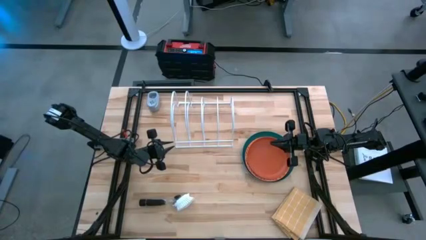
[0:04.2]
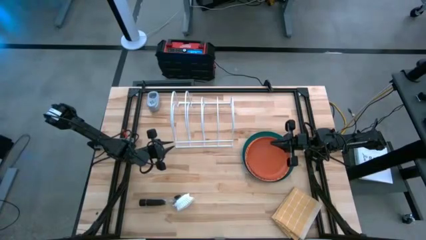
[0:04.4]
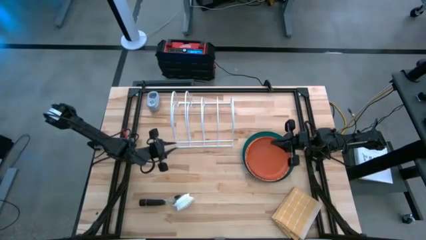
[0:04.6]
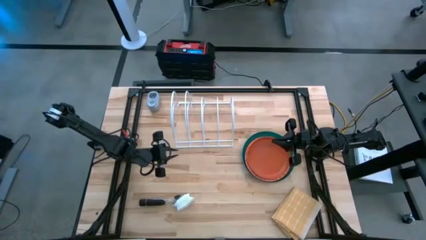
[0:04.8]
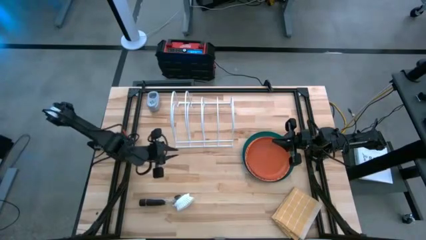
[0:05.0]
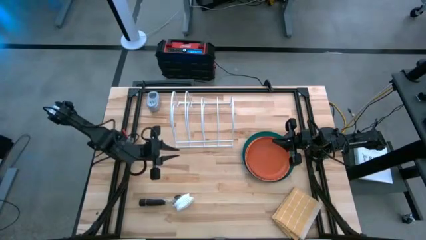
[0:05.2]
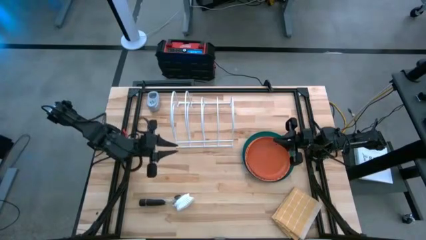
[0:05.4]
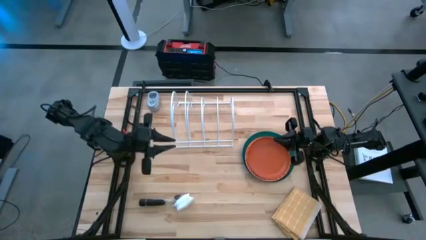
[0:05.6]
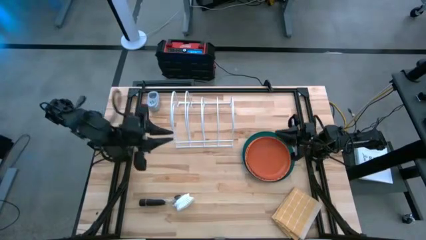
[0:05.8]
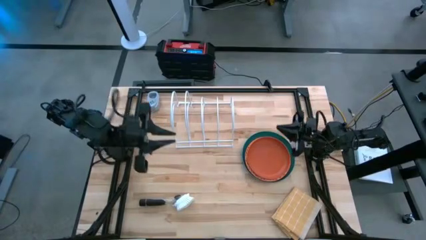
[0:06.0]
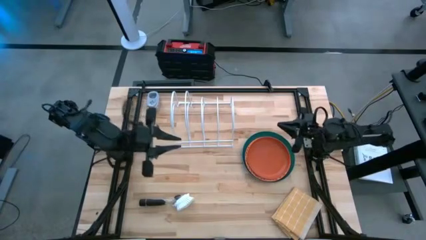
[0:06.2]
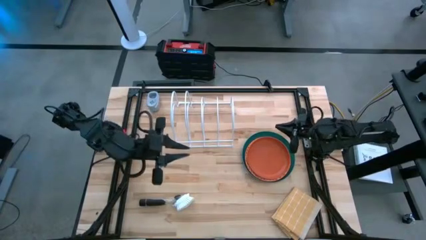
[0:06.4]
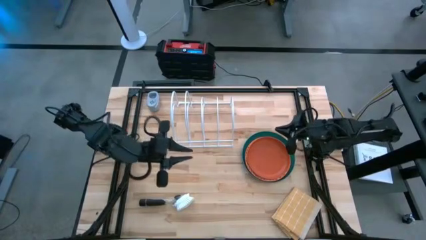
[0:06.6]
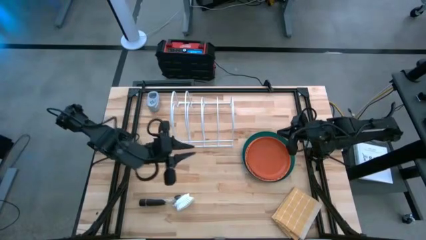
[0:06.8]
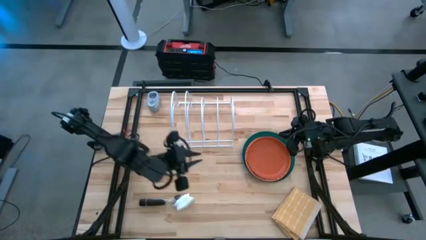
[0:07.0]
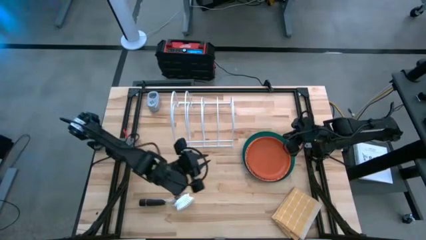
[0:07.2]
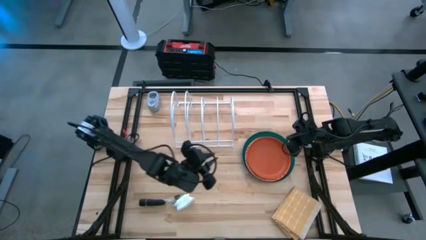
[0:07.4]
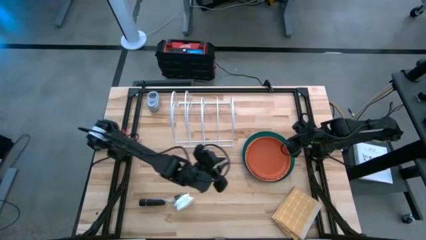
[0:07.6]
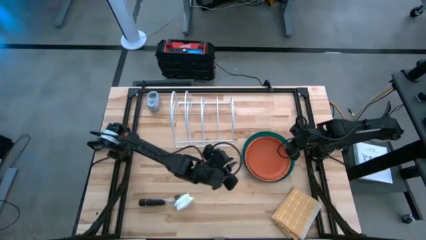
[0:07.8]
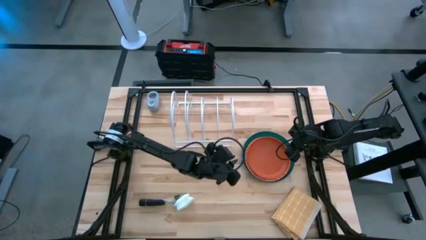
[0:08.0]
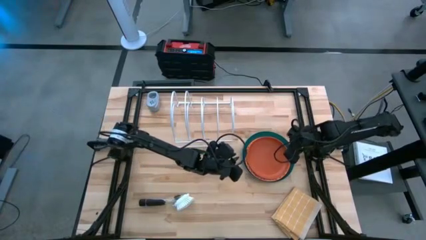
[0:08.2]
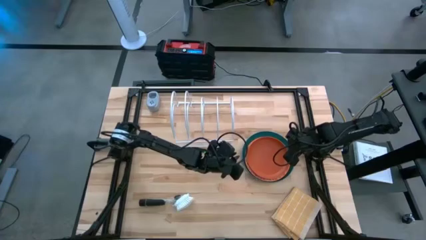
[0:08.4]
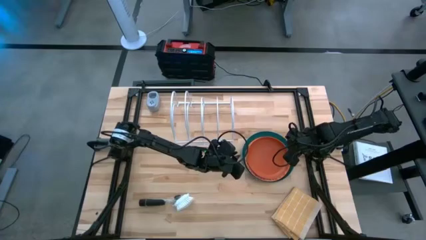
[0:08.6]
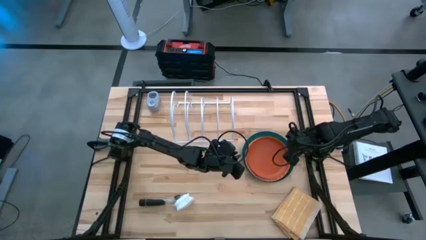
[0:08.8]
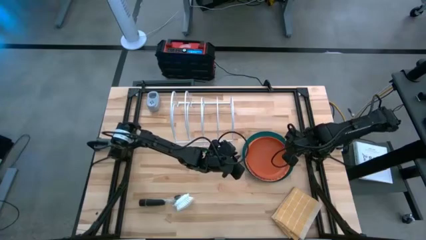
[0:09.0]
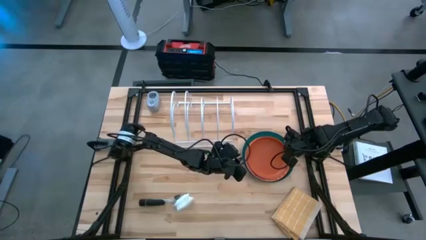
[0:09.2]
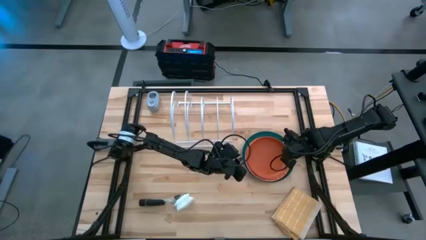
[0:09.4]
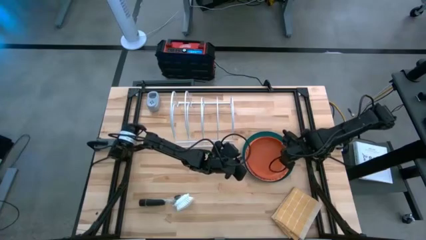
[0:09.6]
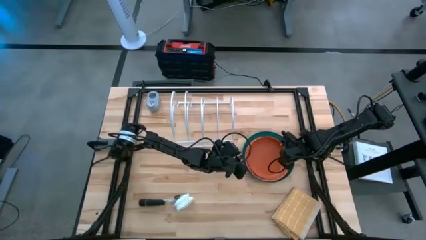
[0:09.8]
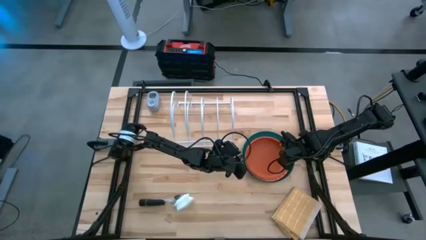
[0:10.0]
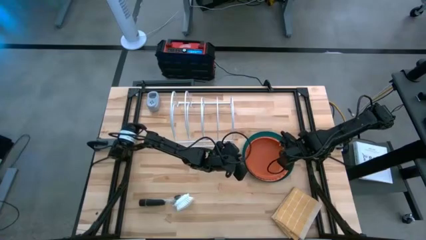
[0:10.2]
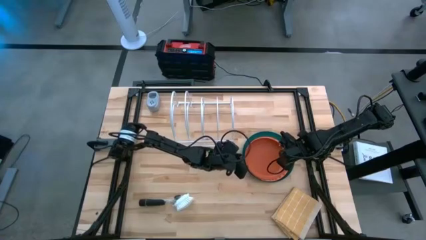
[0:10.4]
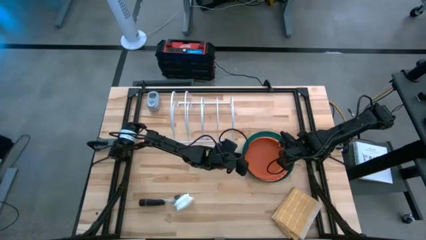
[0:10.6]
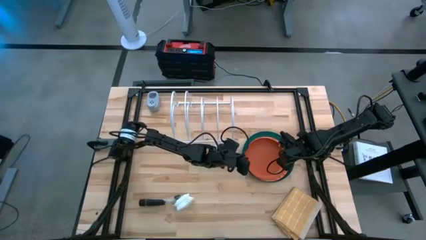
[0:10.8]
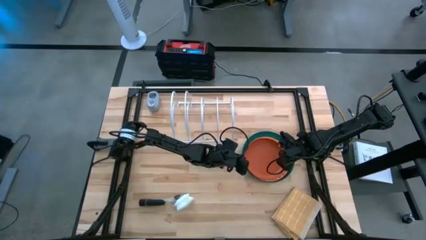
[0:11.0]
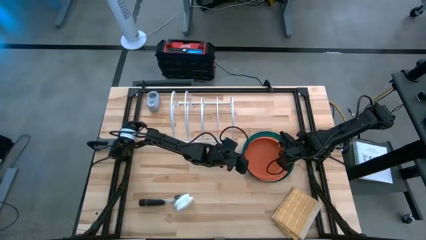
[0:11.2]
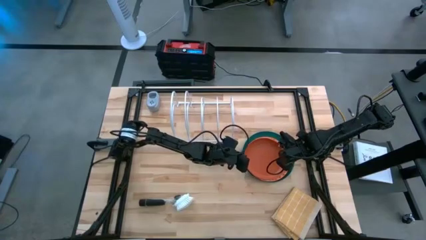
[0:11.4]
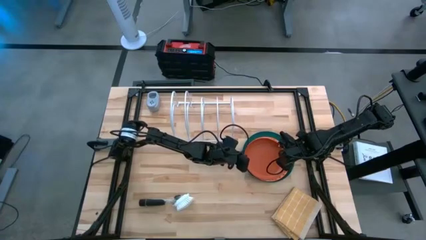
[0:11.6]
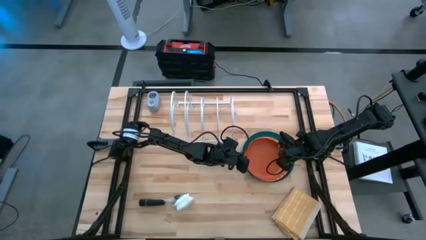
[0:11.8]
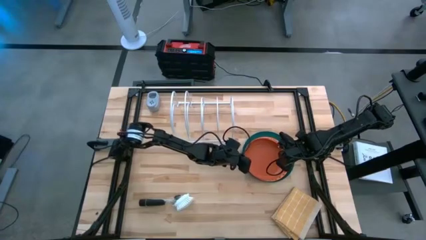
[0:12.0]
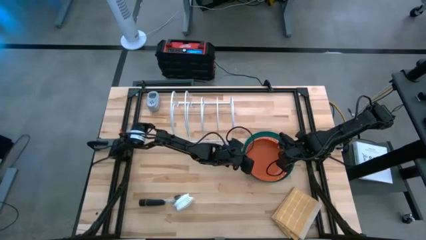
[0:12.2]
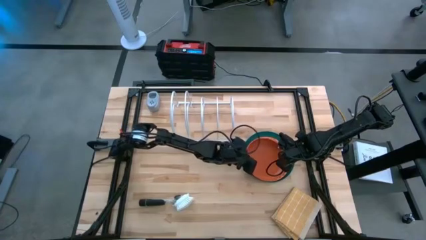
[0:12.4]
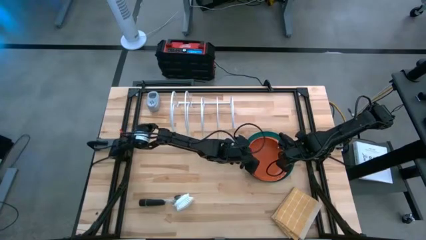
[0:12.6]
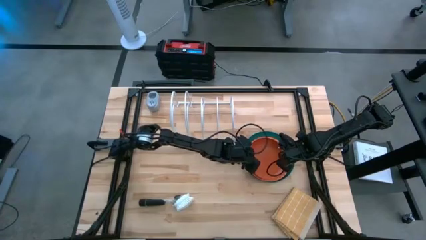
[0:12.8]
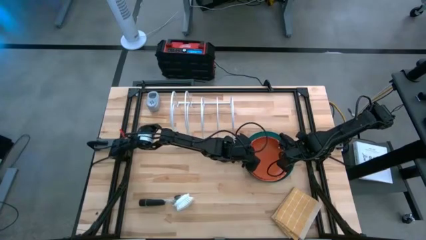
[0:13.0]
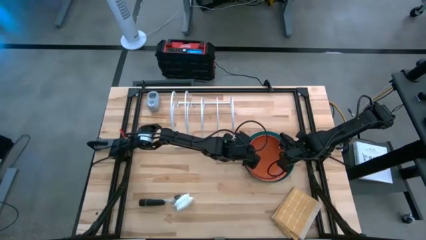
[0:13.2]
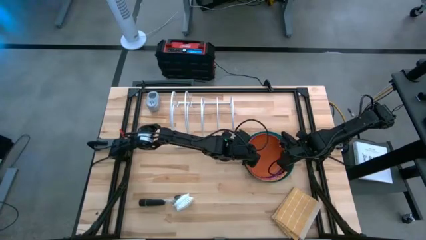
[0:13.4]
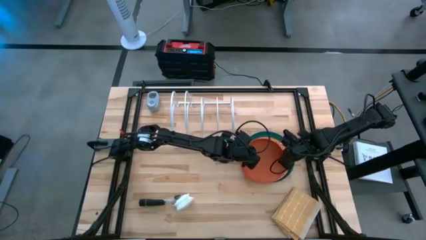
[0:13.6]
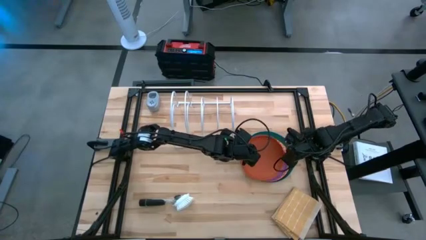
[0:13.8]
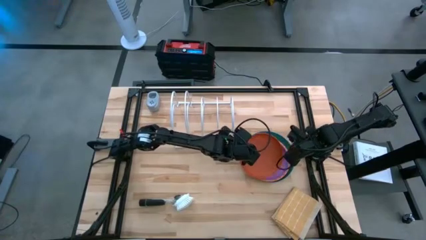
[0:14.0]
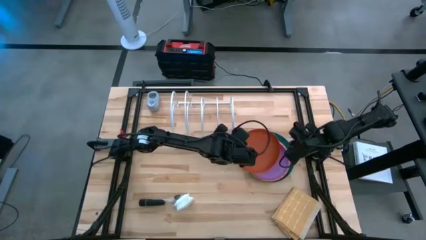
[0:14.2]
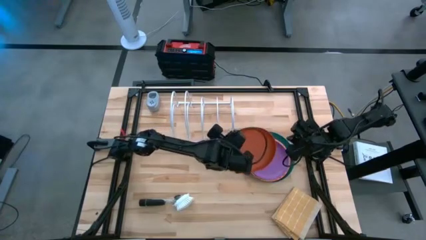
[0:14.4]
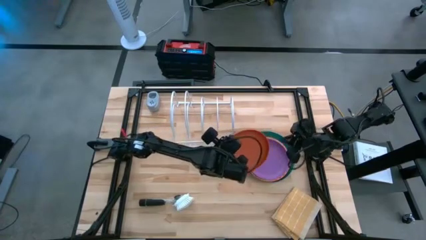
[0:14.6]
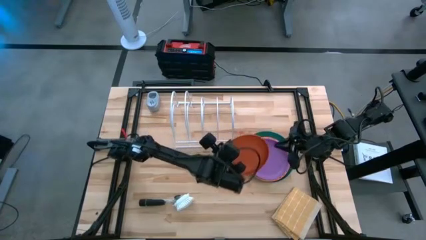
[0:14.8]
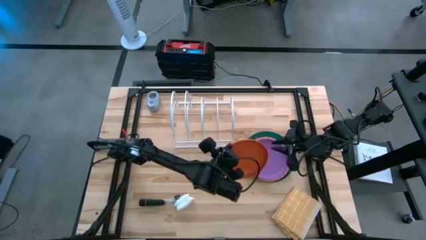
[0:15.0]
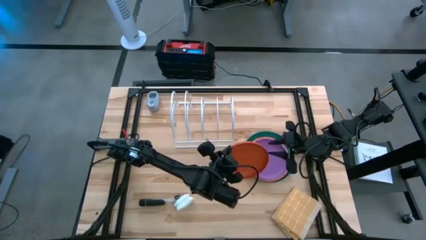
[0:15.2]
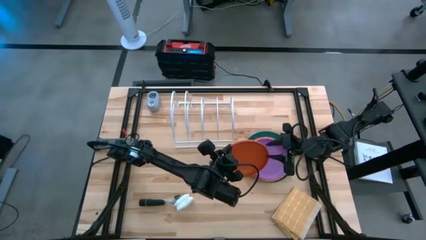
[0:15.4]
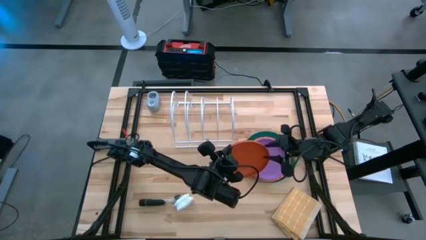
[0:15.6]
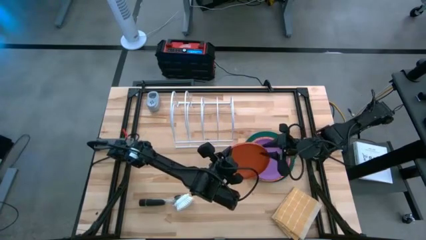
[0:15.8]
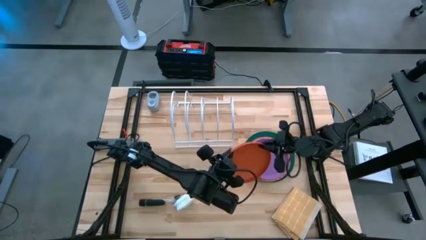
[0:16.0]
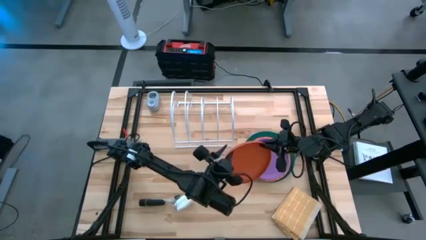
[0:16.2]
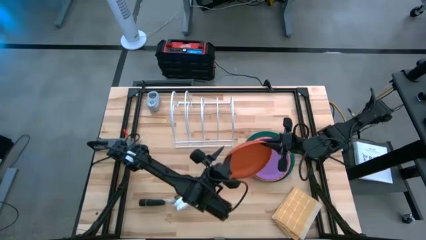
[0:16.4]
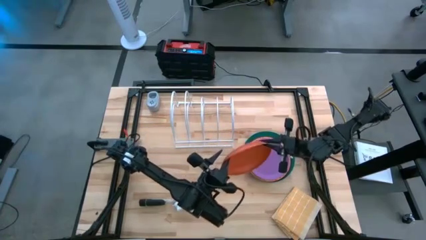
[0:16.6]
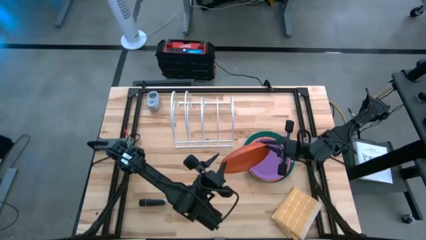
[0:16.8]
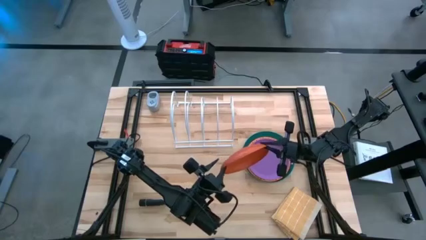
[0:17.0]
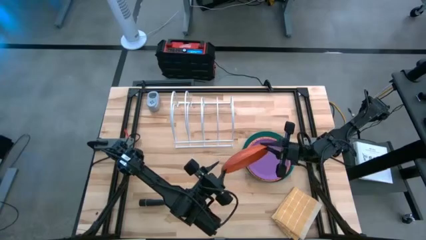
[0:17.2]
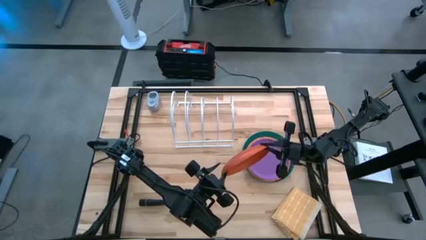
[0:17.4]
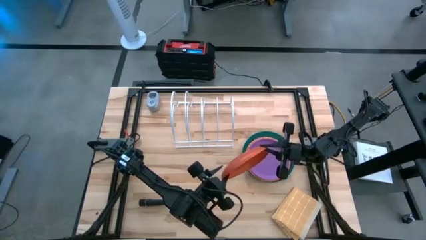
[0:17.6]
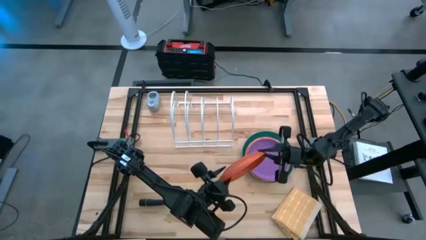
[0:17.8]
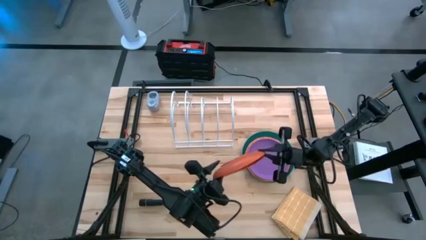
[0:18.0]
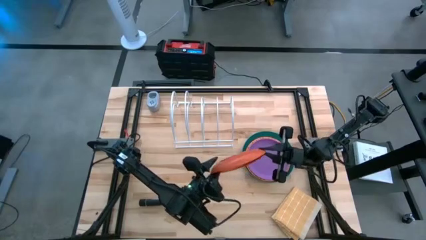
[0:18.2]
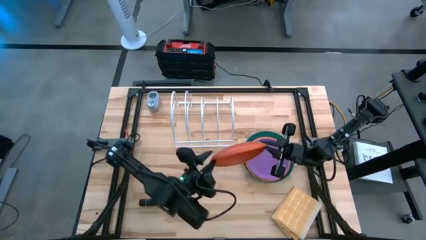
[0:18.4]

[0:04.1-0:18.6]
Task: Sort dishes
Put the orange plate into the dish rack
